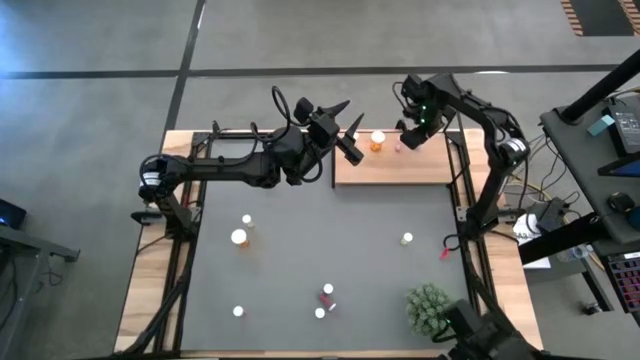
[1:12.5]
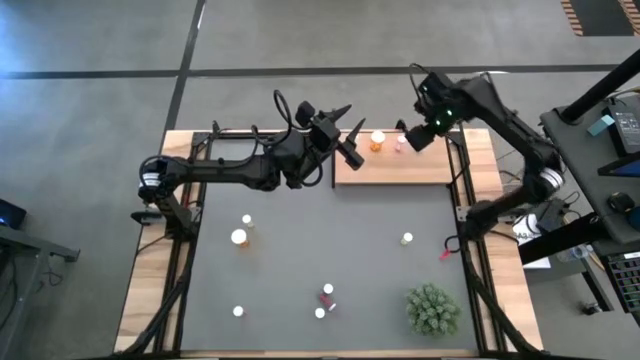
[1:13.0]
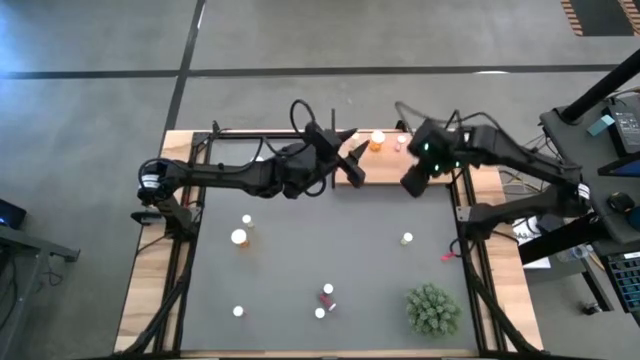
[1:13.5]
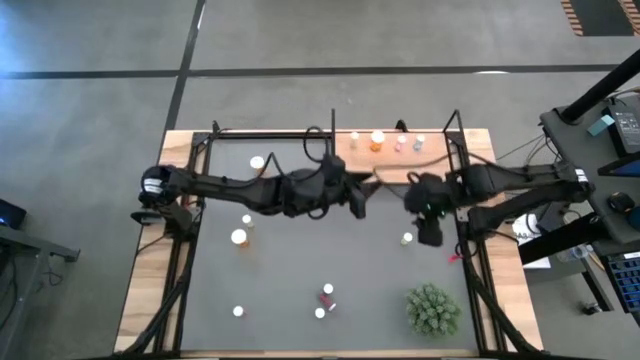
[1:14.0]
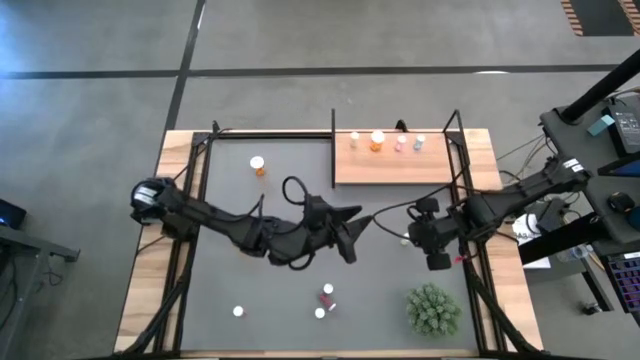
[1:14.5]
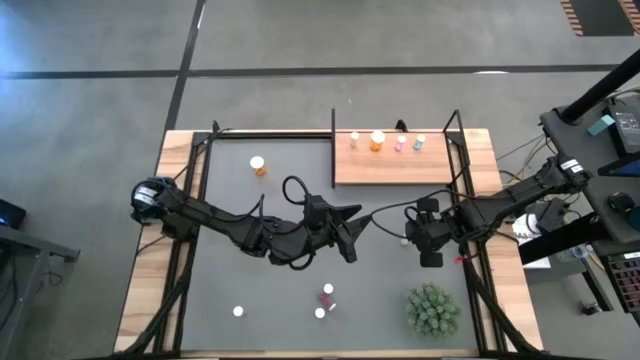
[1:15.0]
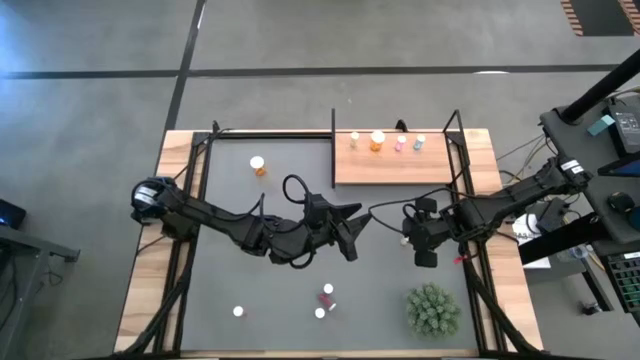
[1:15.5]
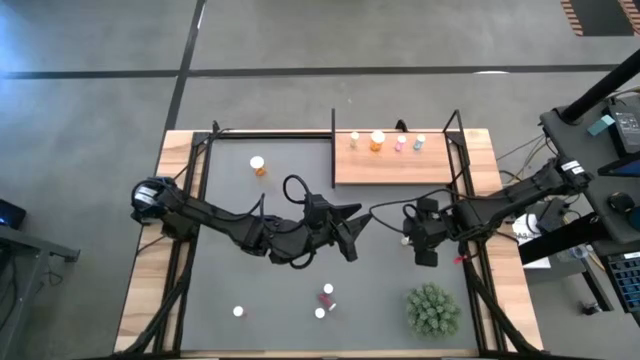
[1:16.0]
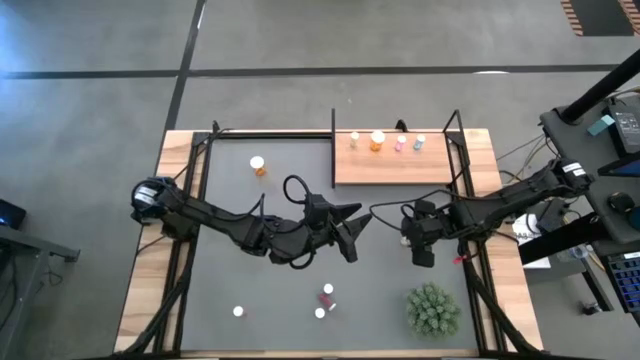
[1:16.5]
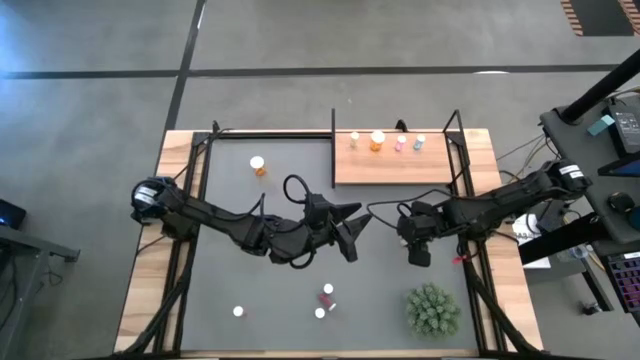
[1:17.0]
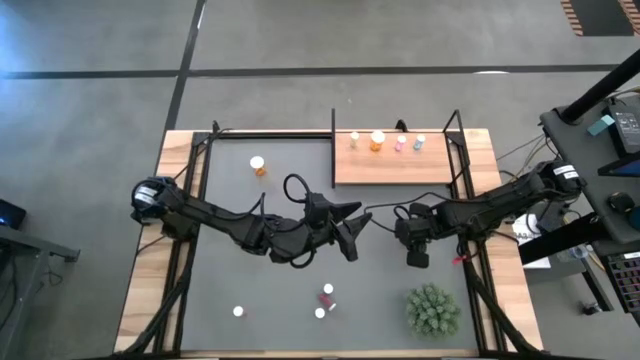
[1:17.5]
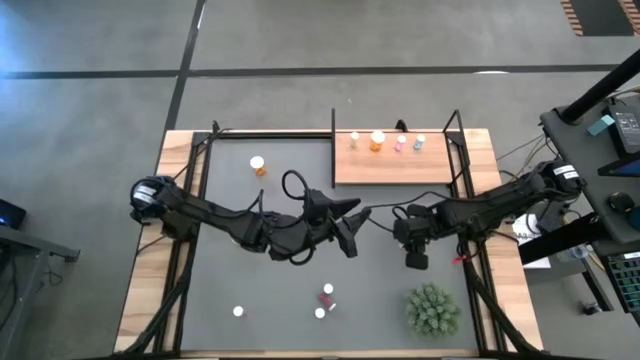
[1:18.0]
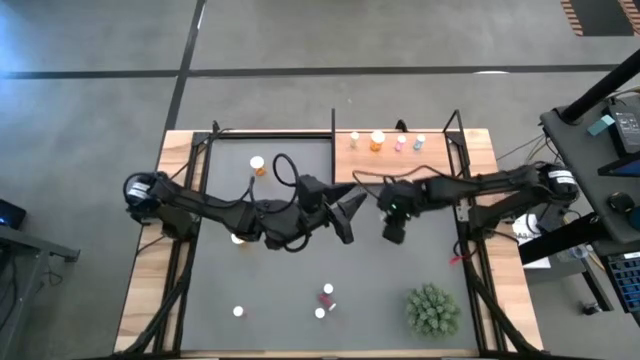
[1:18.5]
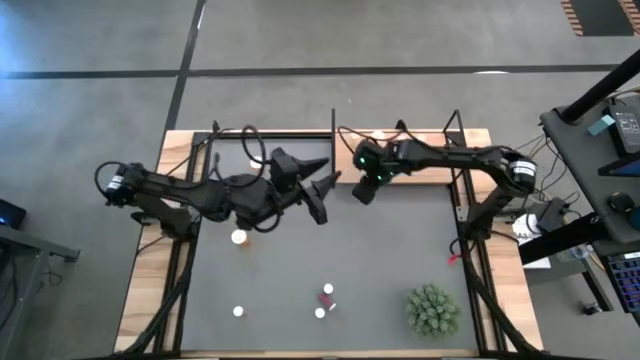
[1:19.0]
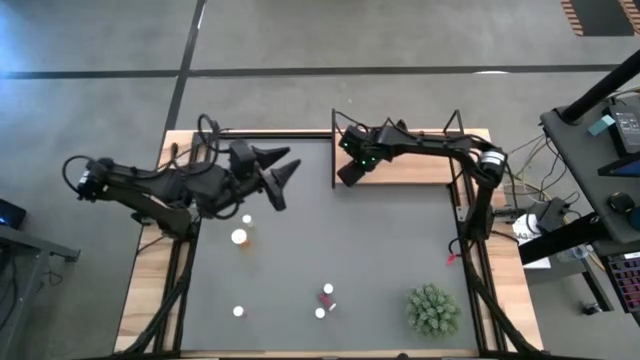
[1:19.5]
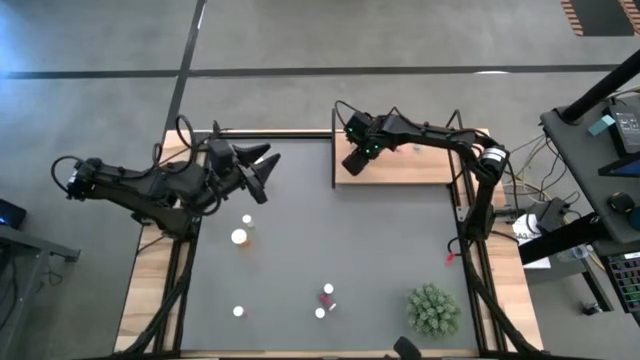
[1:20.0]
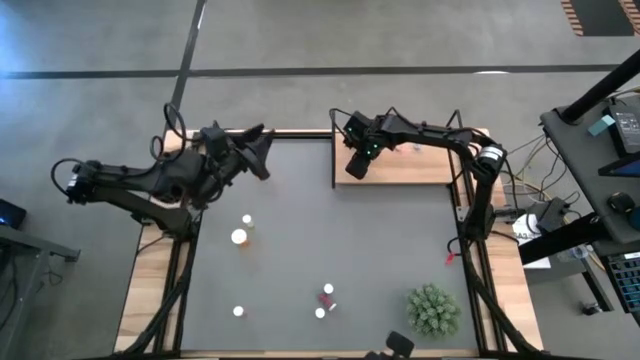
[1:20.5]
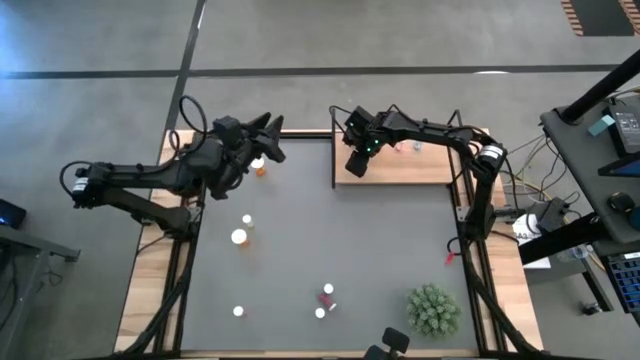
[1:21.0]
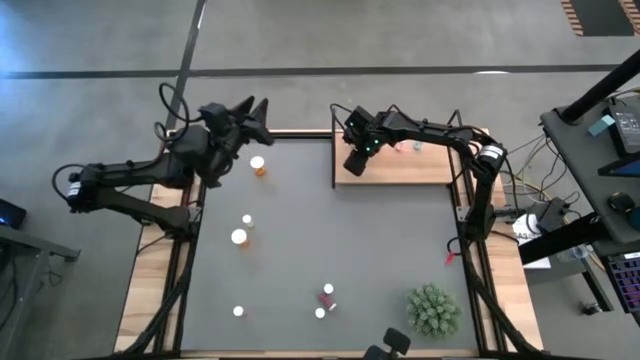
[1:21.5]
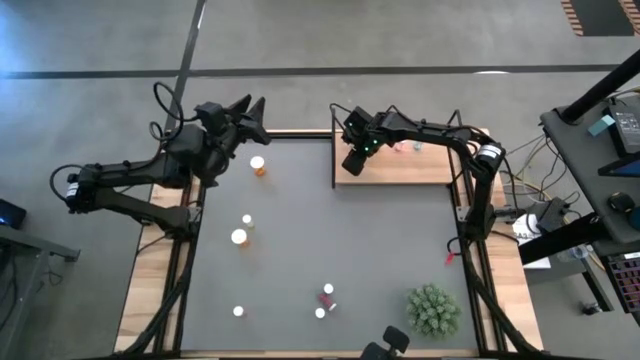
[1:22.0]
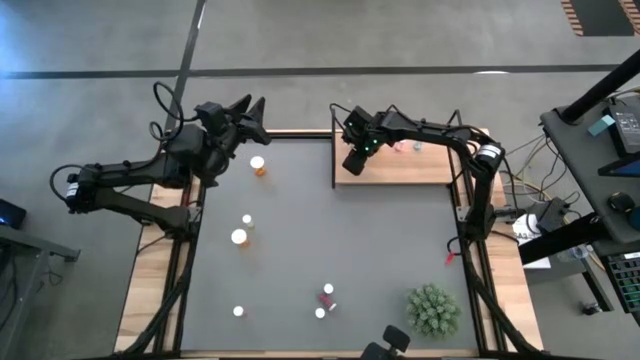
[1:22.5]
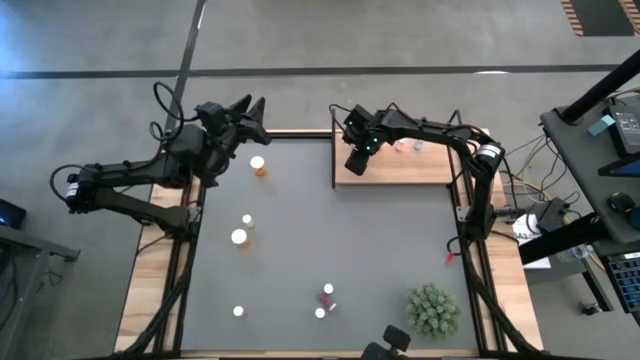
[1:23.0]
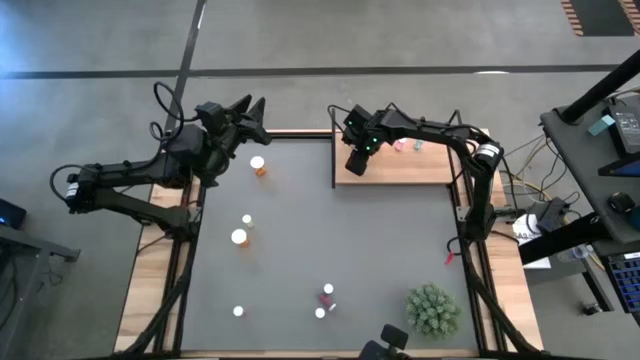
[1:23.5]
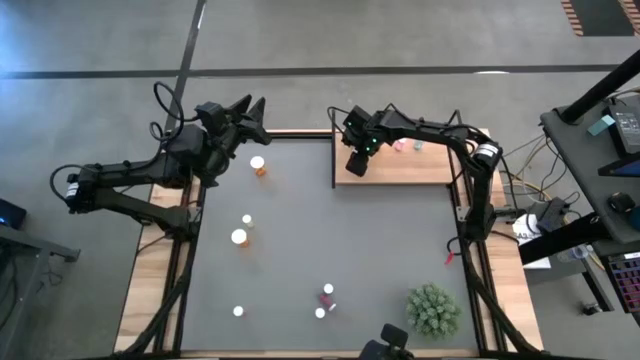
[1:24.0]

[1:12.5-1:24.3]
Task: Pick and place medicine bottles onto shelf by color
Put the bottom yellow medicine bottle on the shelf aligned with the other yellow medicine bottle

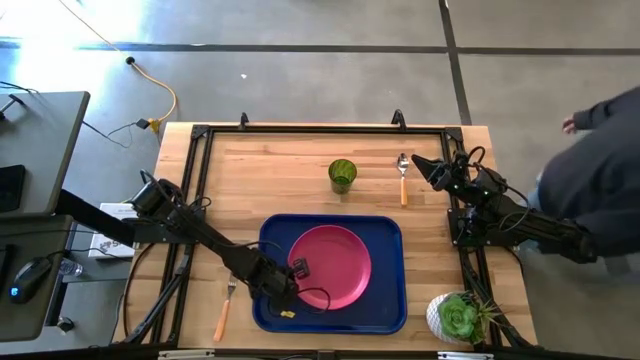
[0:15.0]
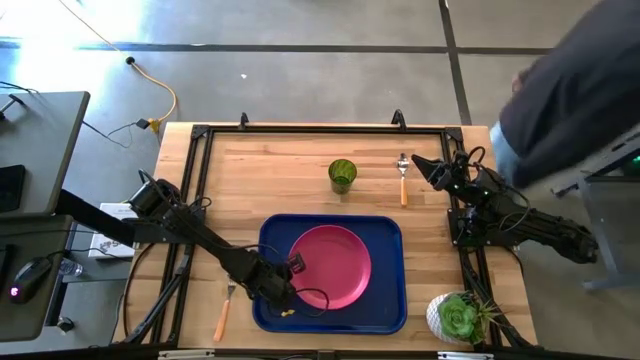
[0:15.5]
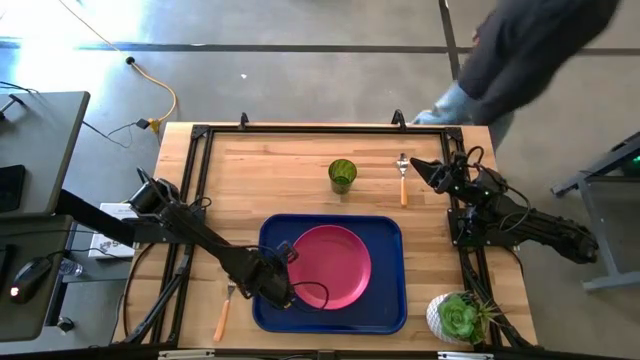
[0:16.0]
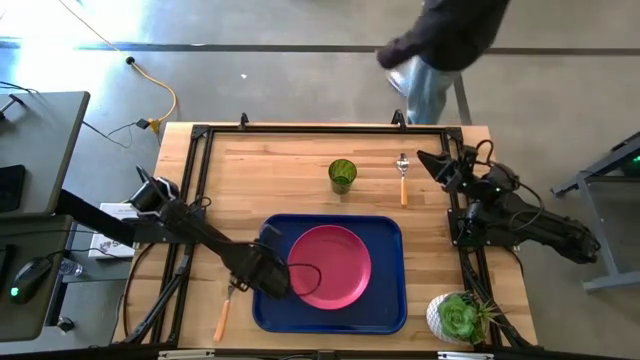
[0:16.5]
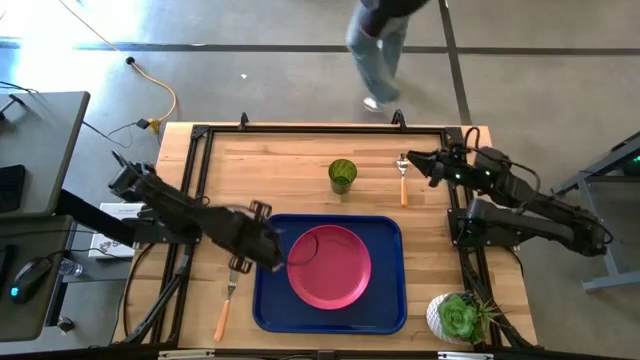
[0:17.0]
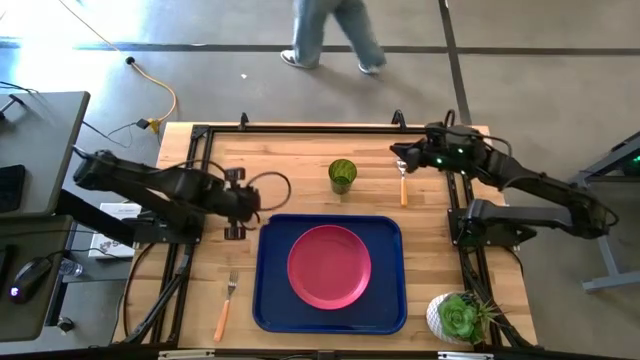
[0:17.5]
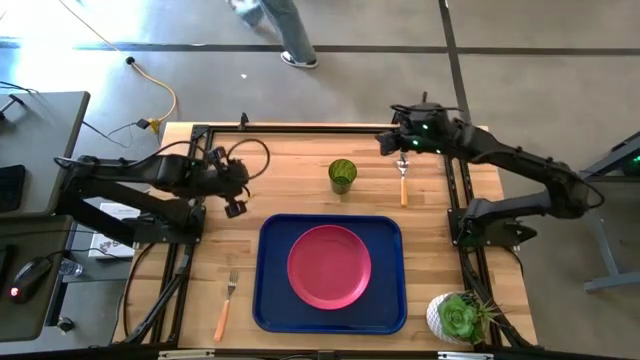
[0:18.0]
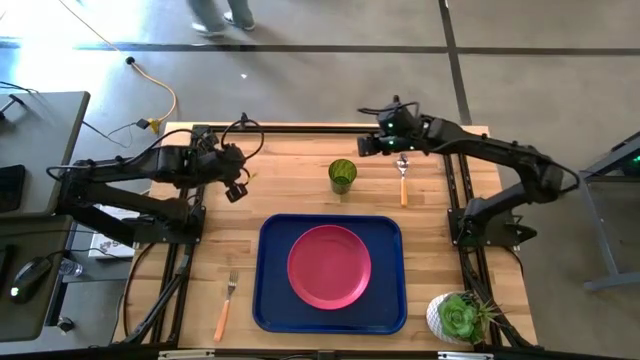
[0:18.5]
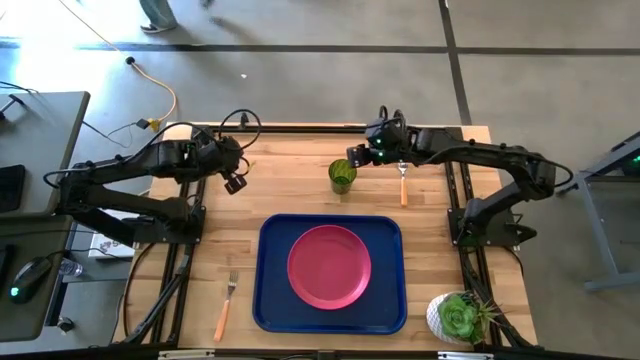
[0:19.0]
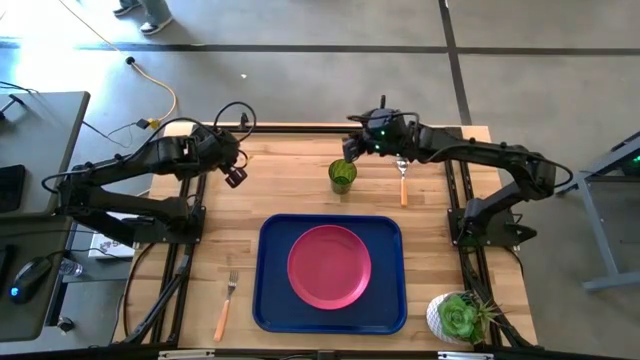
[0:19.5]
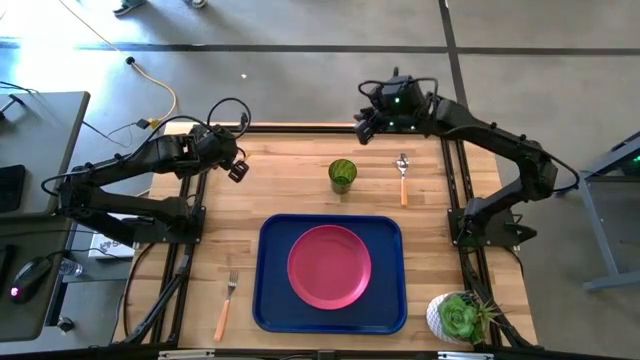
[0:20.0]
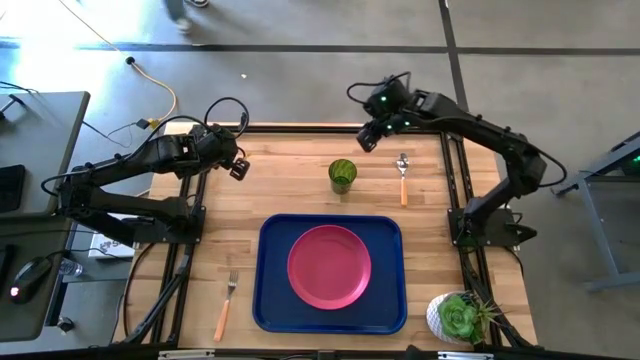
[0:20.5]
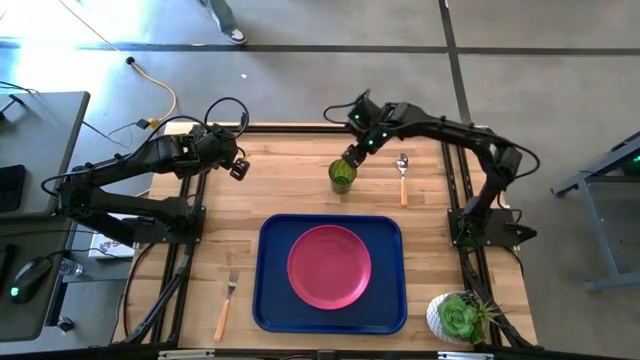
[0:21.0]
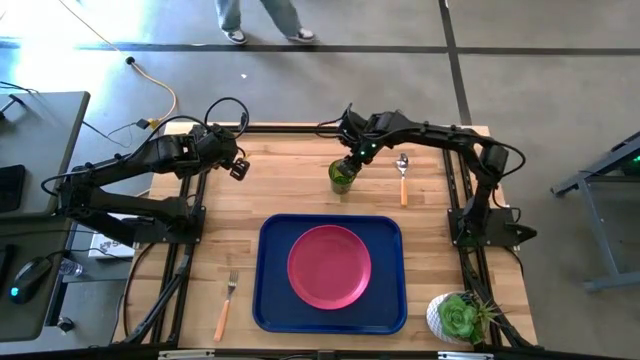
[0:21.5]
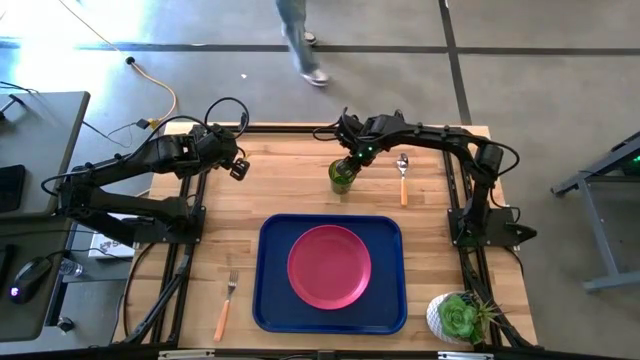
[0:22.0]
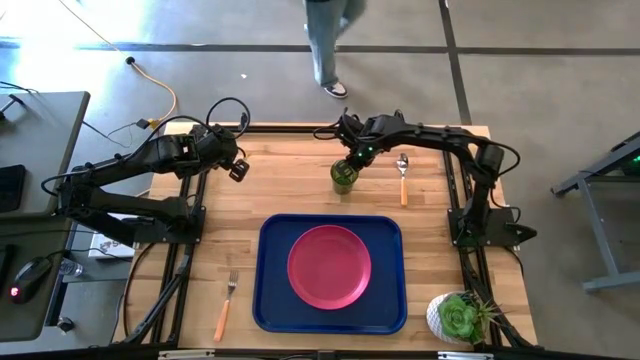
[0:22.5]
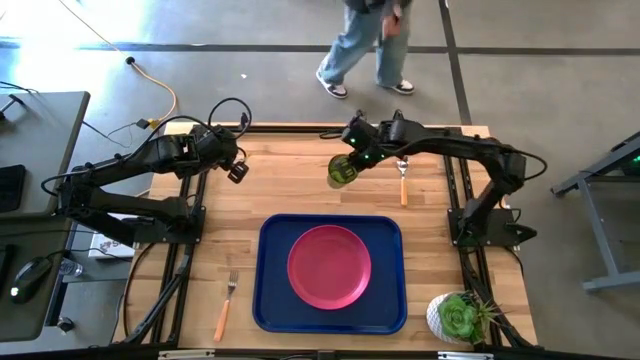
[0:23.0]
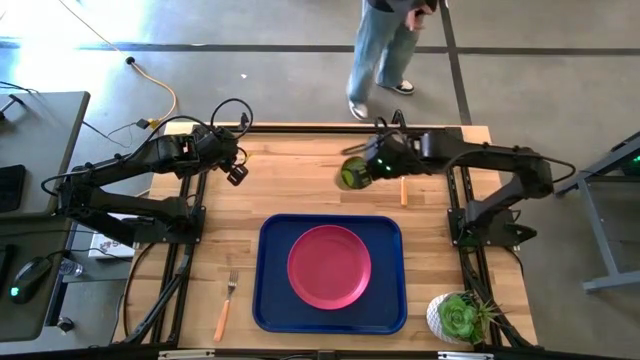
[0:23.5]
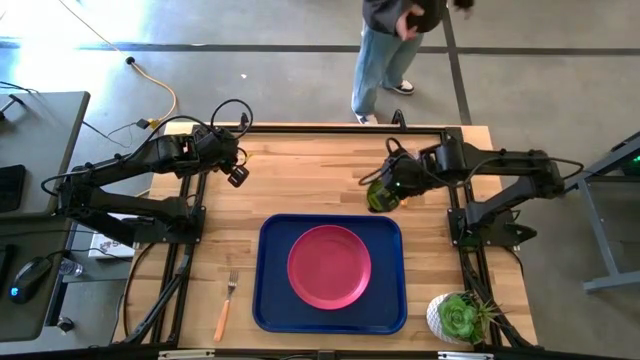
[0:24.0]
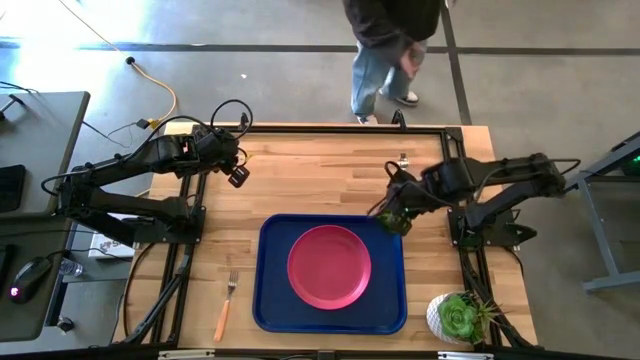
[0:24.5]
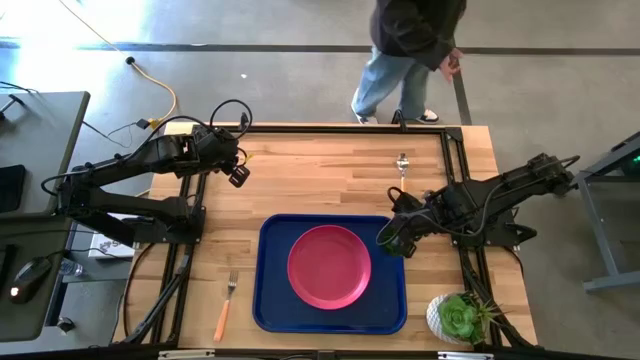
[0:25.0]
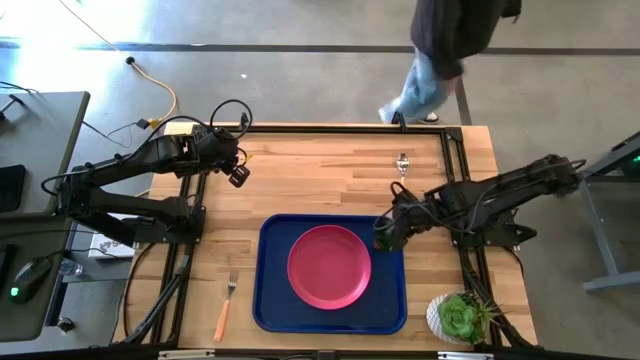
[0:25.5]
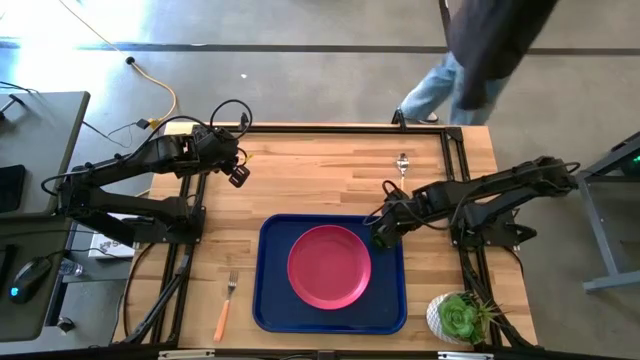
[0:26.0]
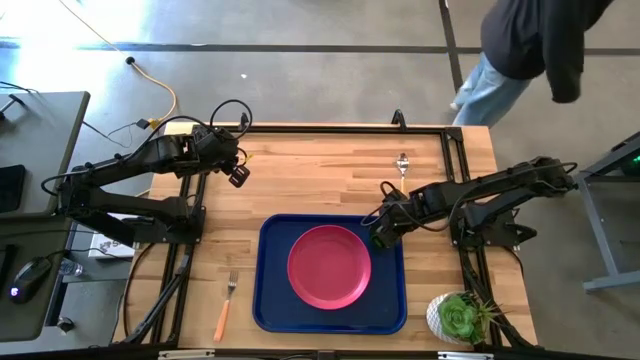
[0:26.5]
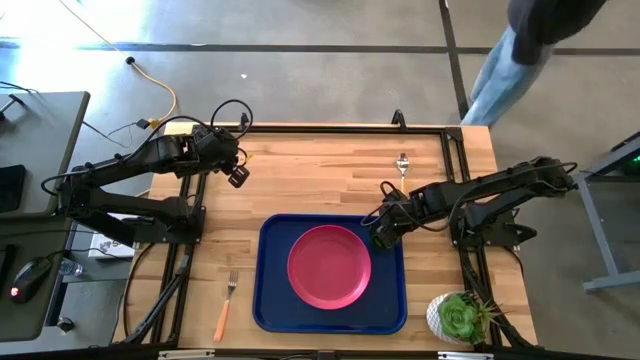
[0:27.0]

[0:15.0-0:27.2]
Task: Pick and place plate/cup/fork/spoon on tray
Put the green cup on the blue serving tray to the top right of the pink plate
